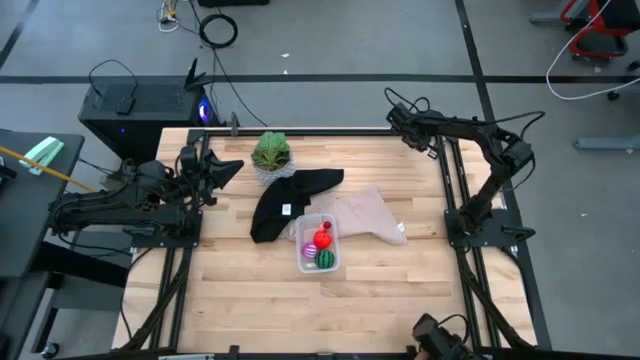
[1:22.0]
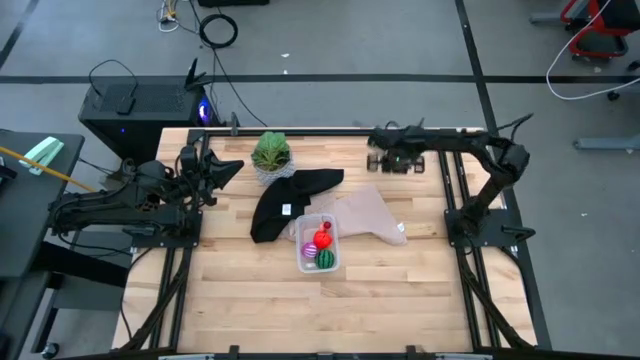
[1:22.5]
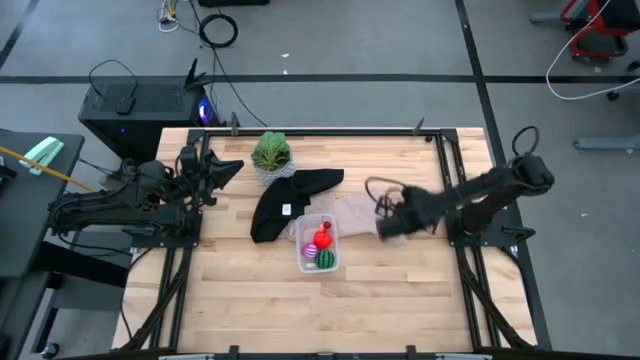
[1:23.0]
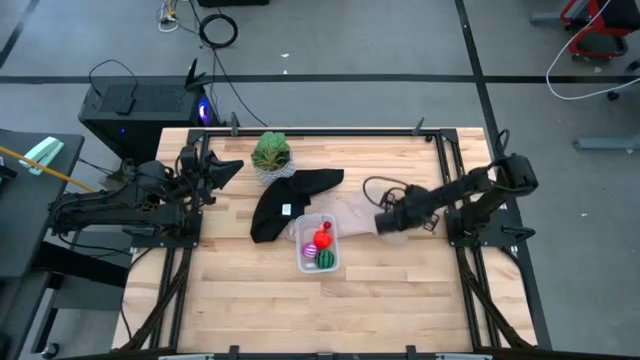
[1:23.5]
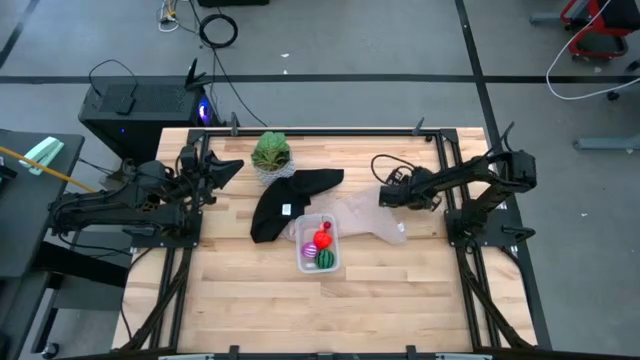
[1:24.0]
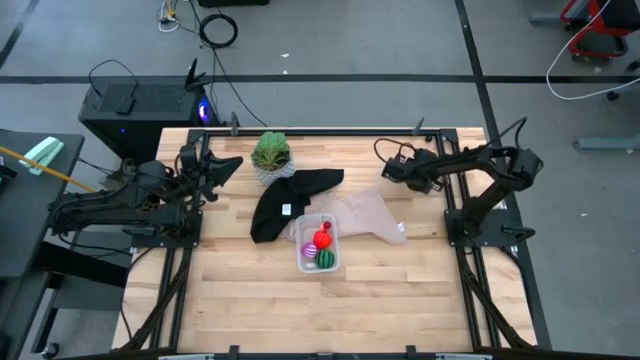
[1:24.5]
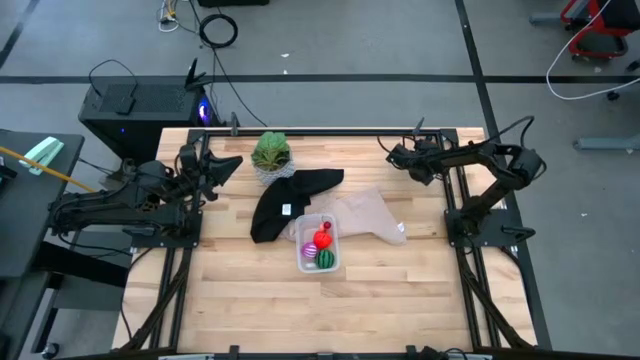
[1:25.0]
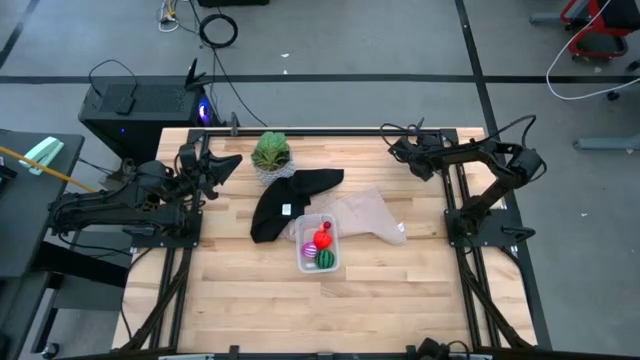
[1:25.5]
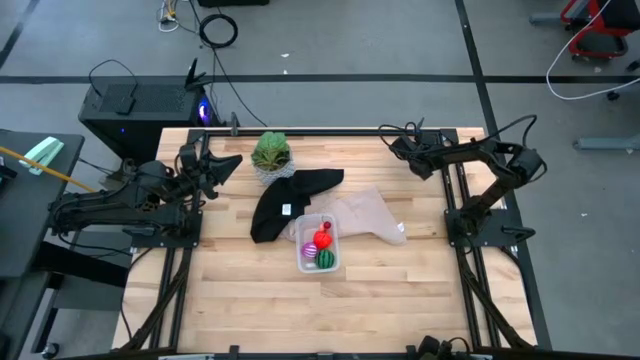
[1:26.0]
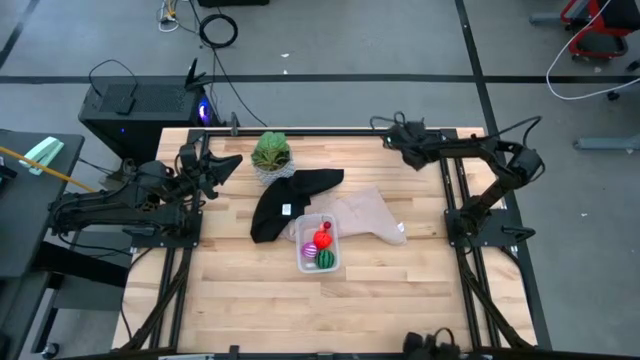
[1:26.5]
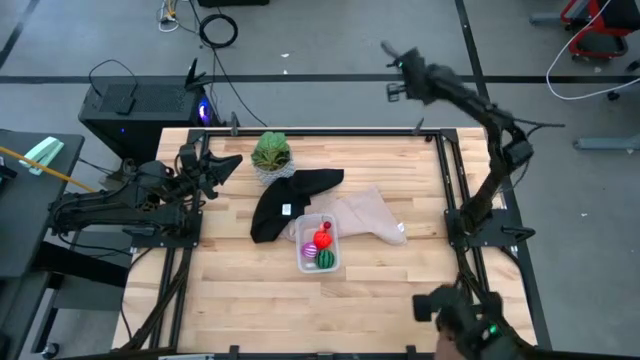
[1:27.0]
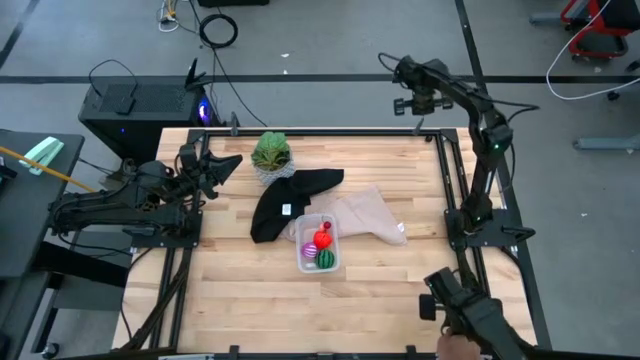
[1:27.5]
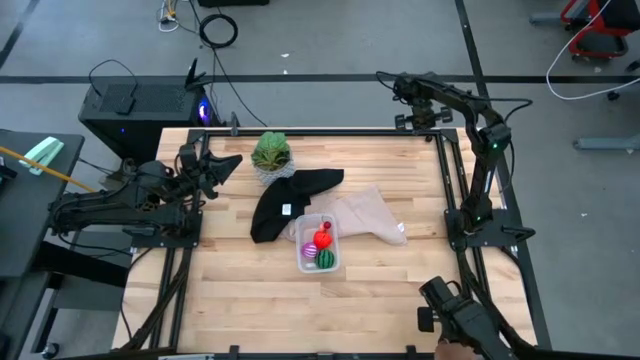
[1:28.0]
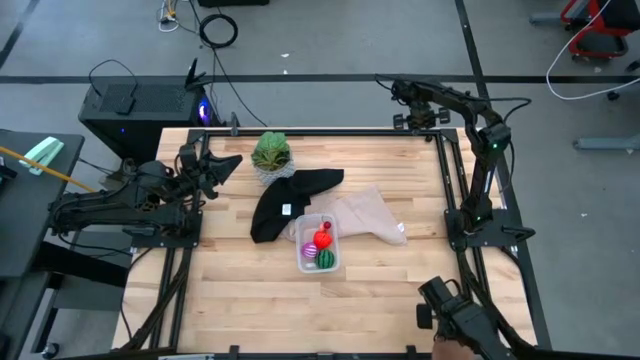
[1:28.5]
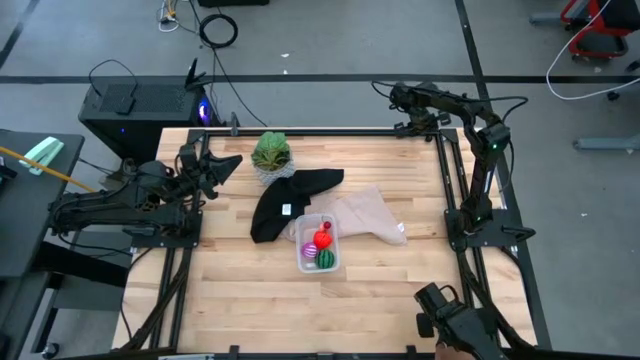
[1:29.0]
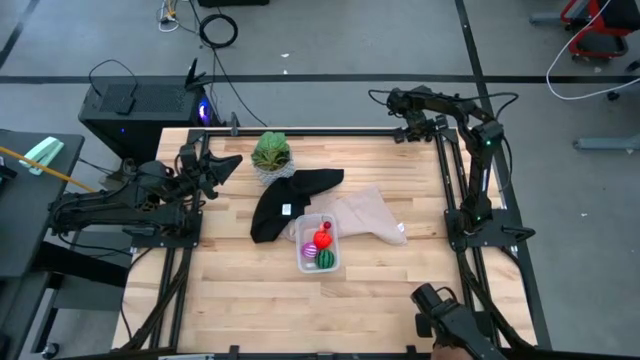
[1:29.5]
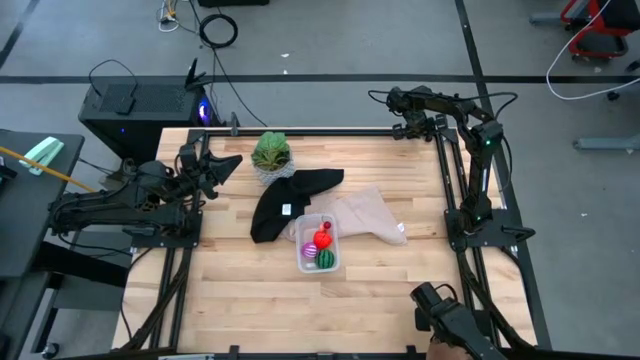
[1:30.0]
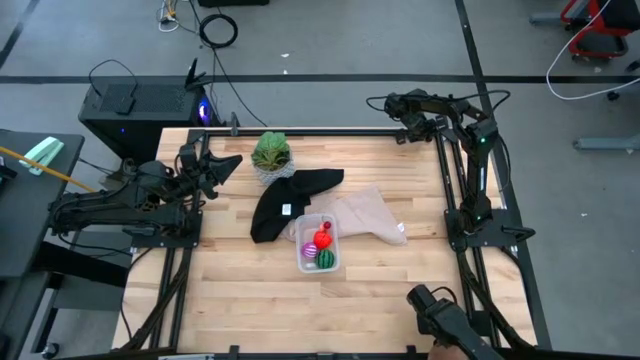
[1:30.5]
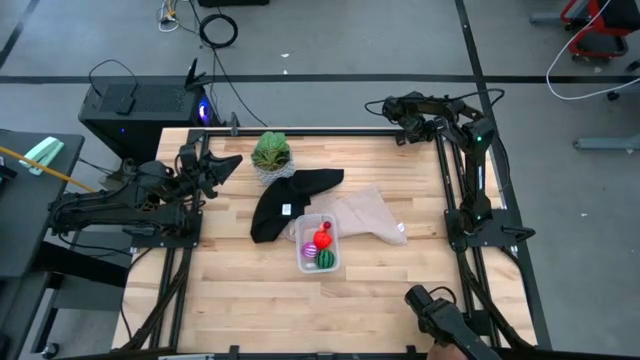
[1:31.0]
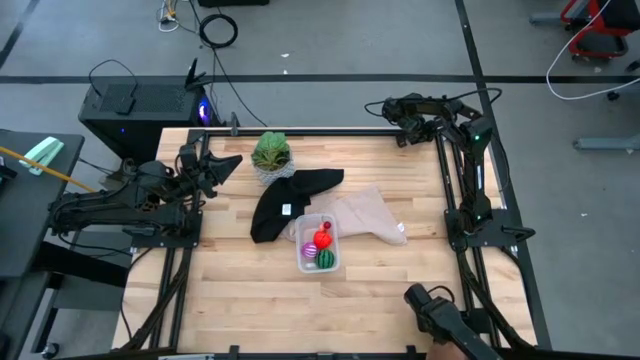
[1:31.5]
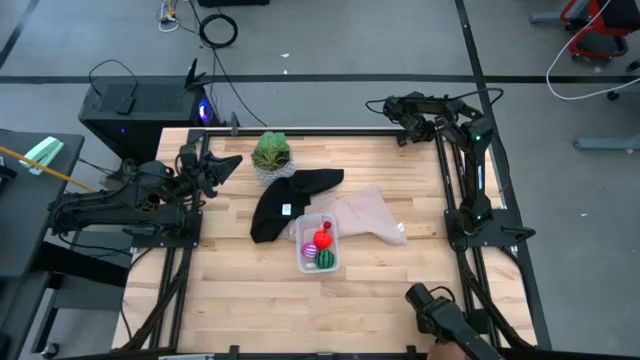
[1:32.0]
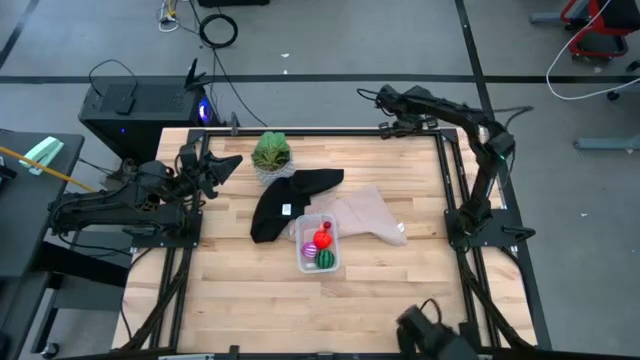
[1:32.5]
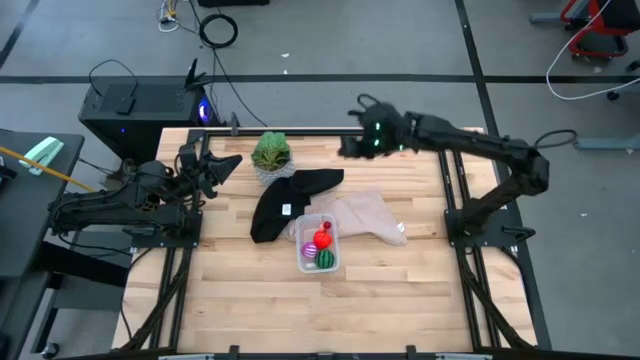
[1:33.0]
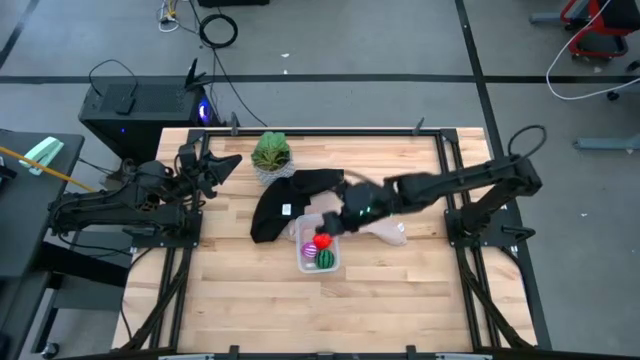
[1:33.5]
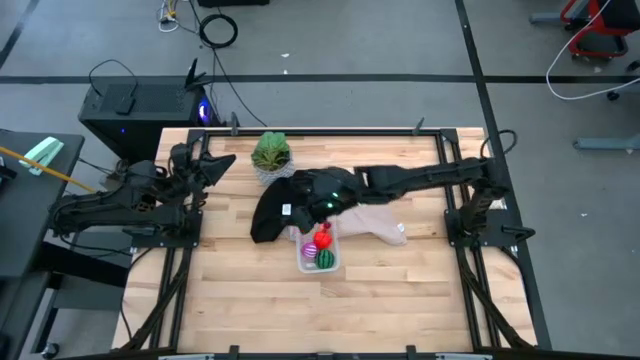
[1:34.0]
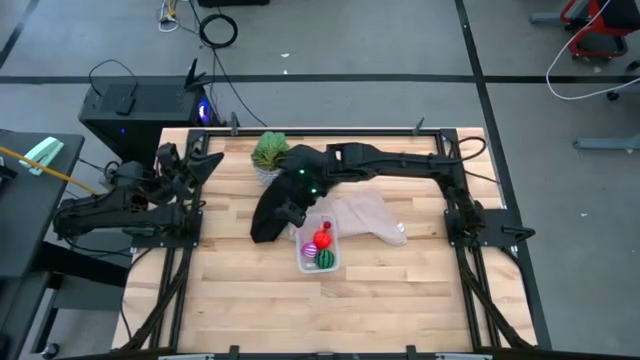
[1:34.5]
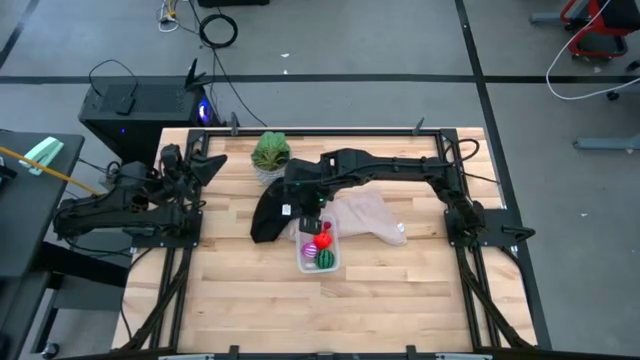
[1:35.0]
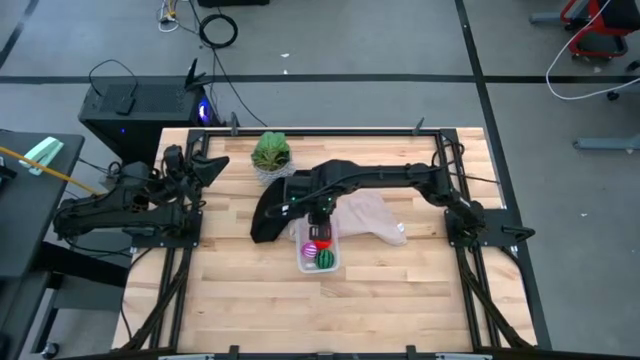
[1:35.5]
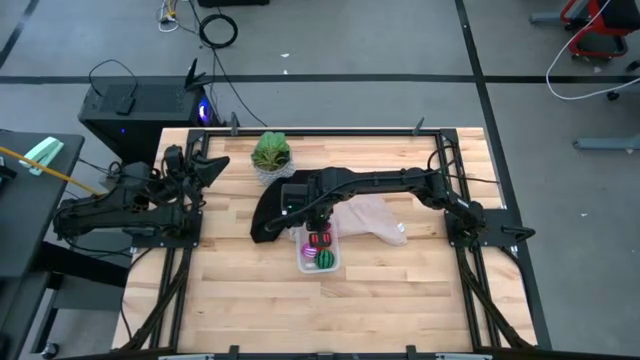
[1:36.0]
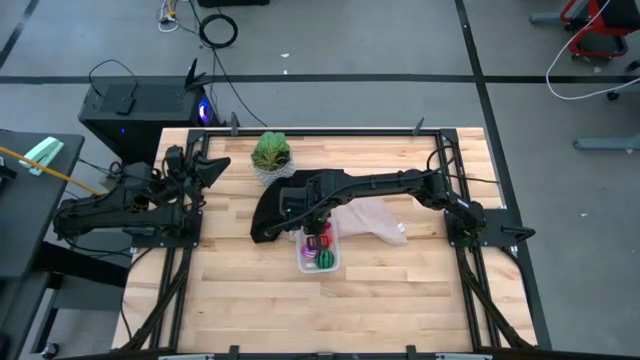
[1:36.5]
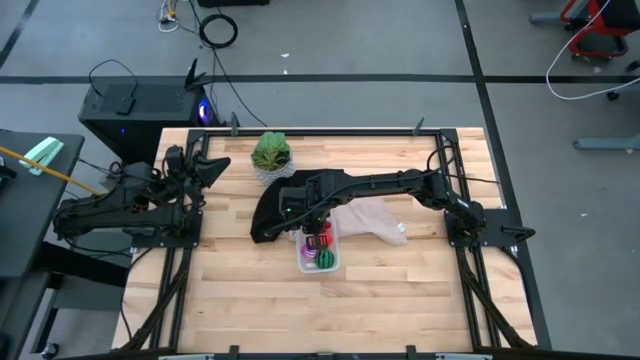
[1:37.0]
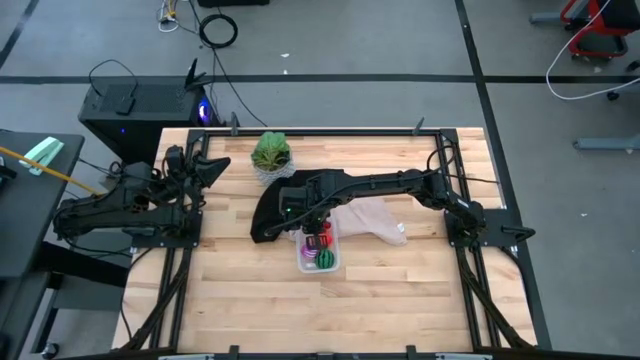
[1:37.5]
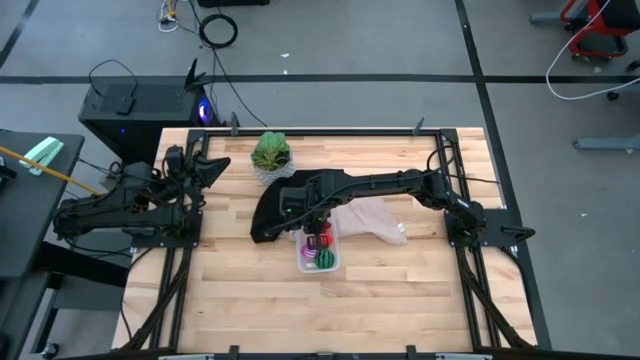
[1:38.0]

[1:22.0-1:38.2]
Task: Pick and placing Produce into tupperware
Put the plum into the transparent container

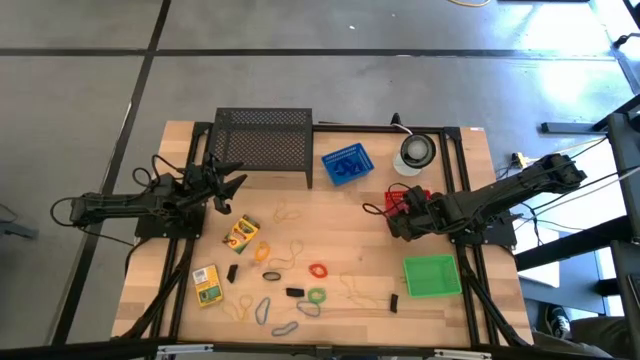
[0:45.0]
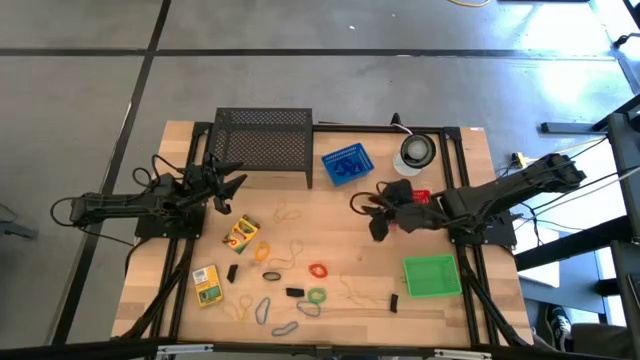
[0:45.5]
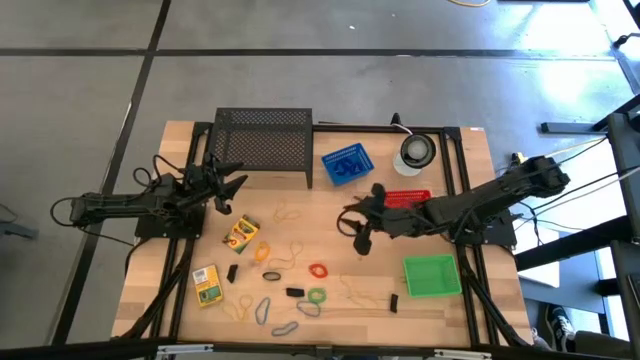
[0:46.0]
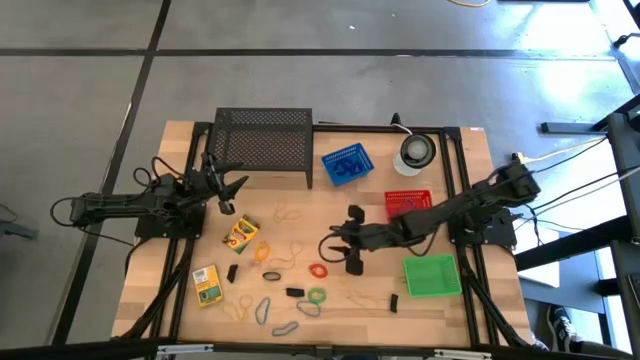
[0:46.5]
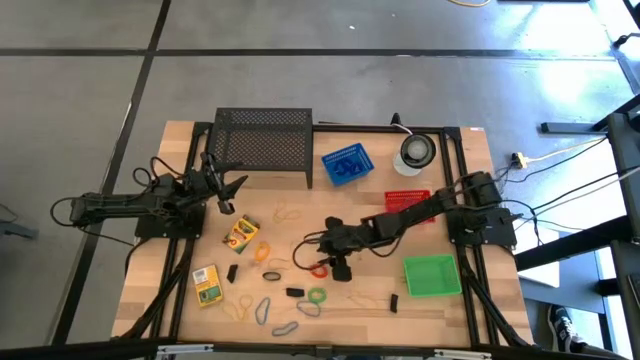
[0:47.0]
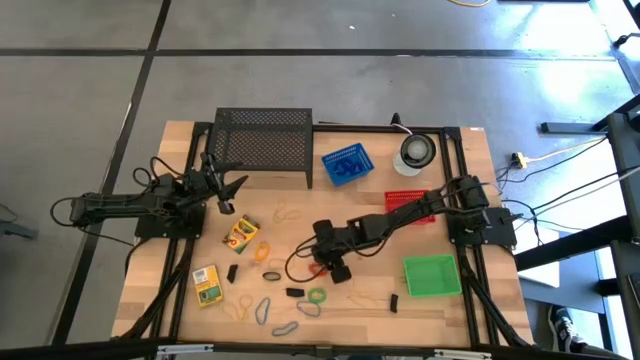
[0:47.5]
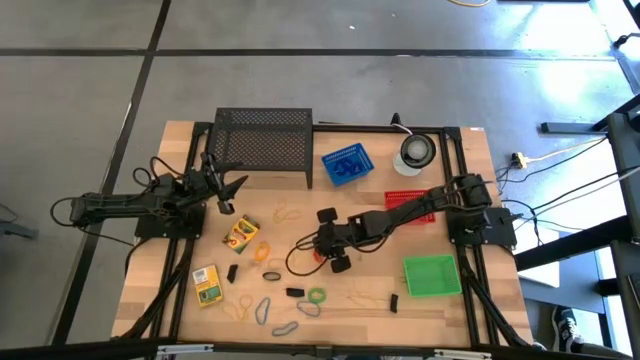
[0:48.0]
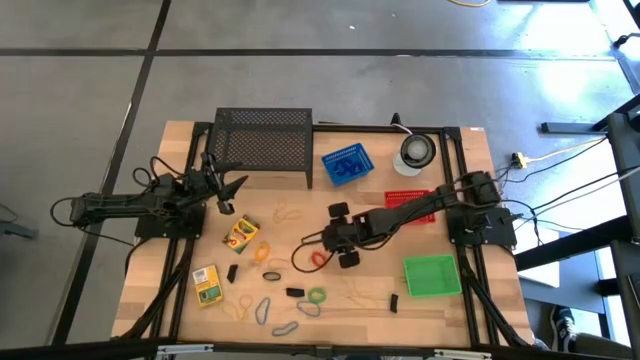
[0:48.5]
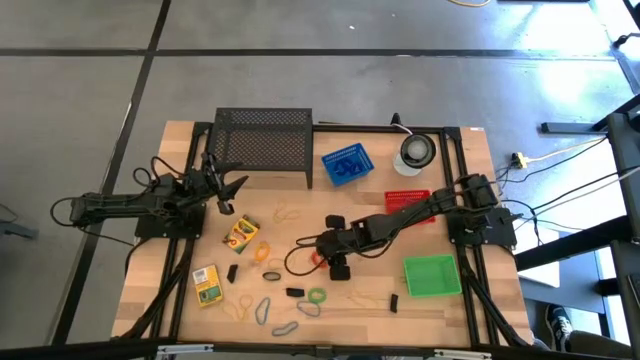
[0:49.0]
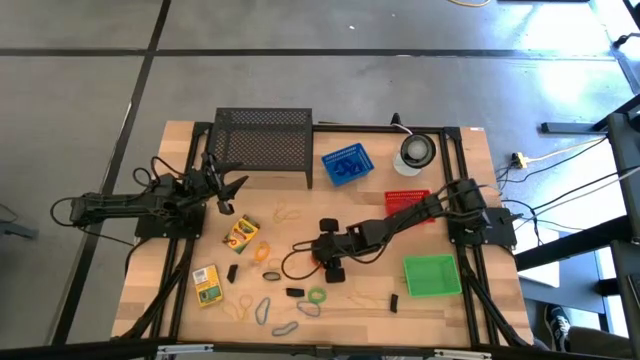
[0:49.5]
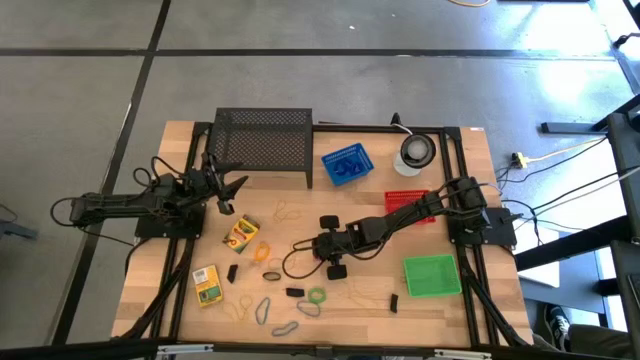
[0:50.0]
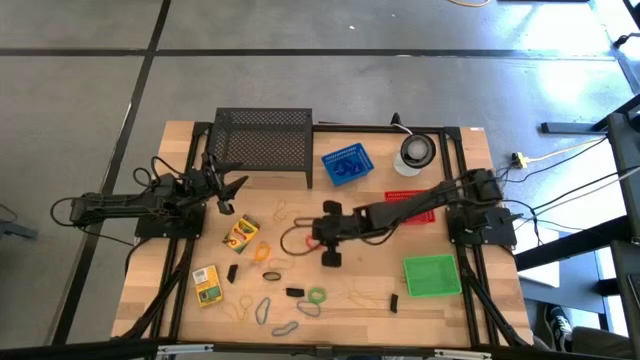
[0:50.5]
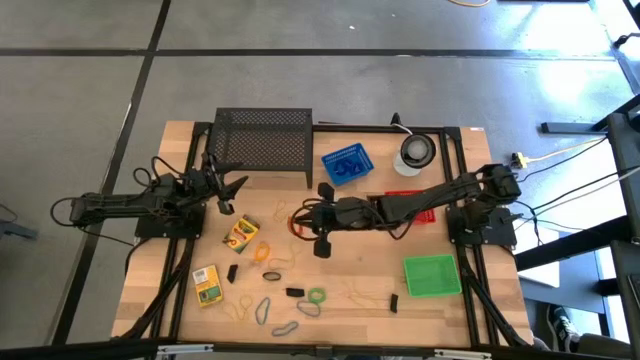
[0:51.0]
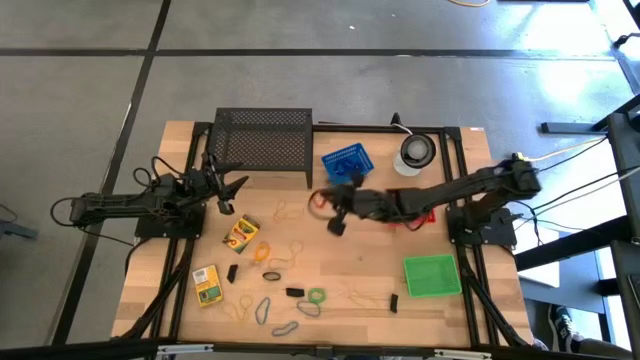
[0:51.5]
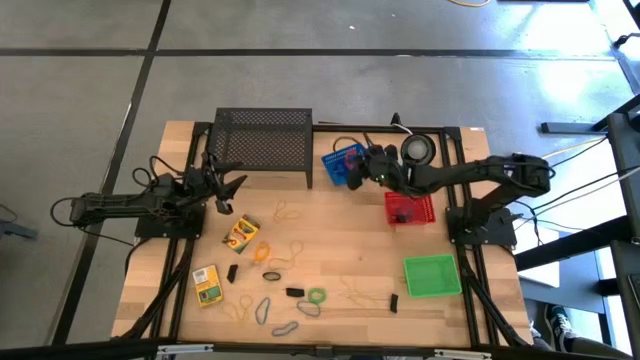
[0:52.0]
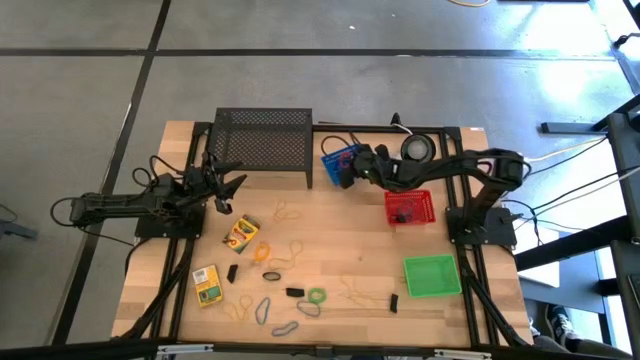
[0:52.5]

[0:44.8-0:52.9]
Task: Pick & Place Office Desk Supplies
Put the orange wrist coil into the blue bin
